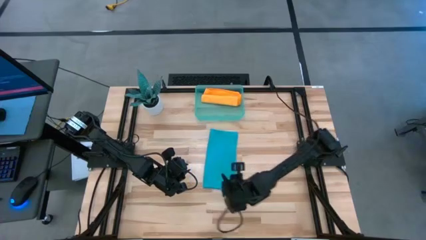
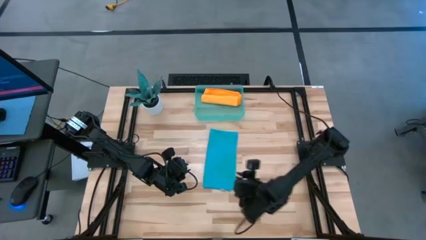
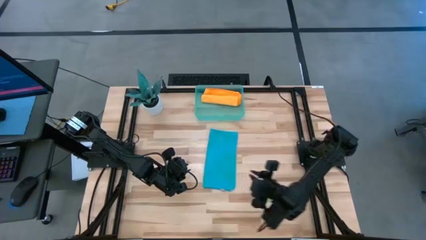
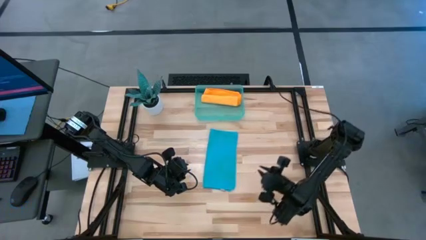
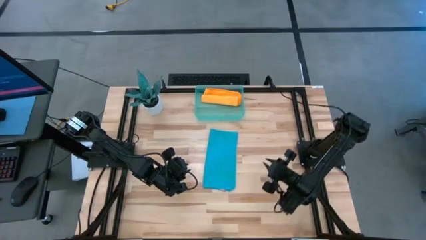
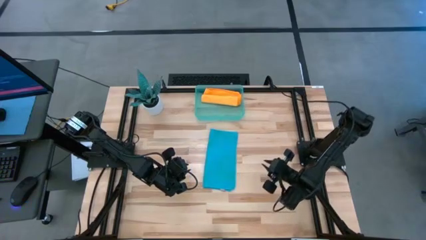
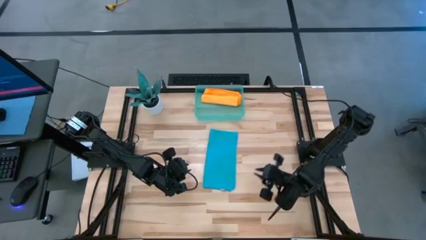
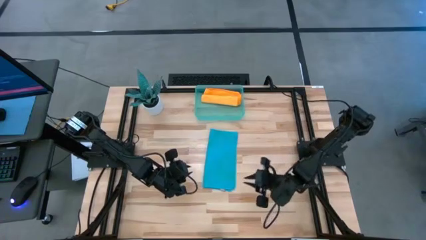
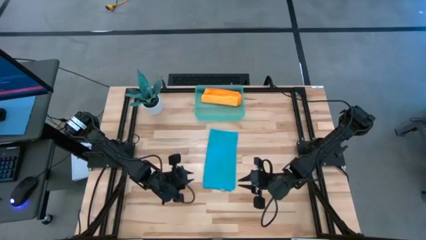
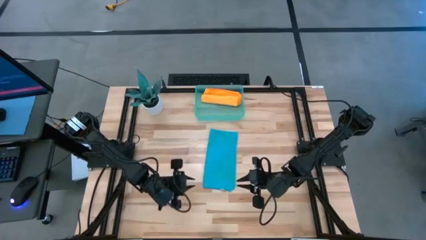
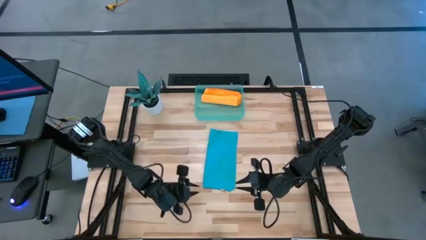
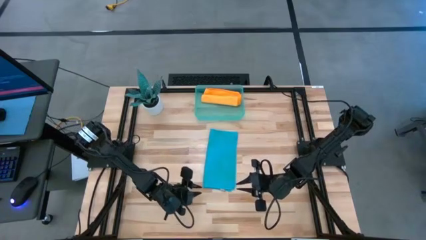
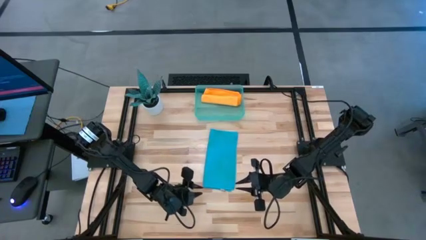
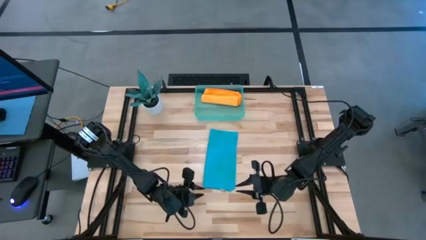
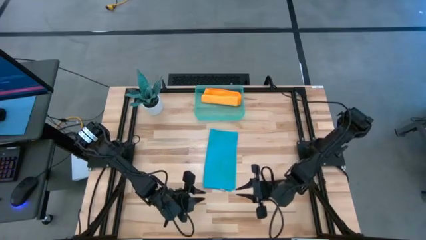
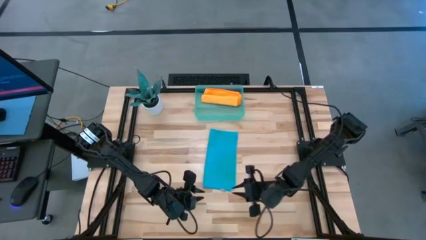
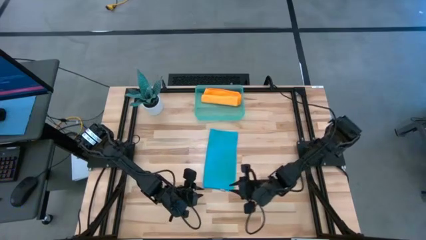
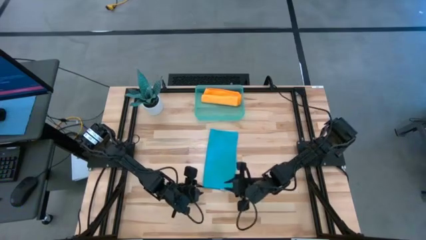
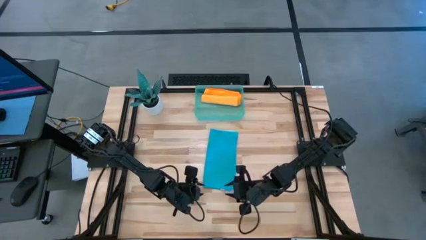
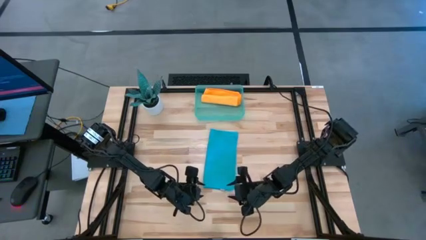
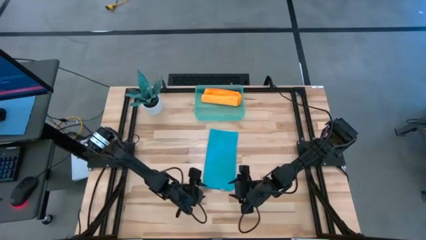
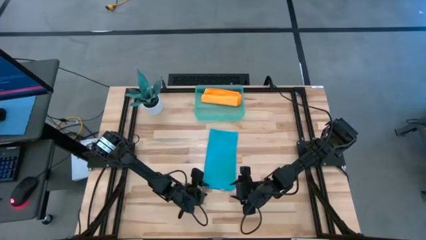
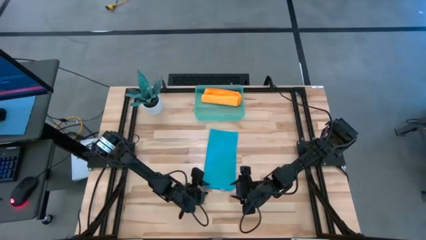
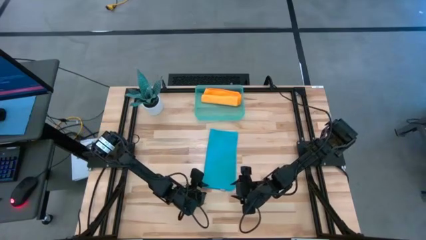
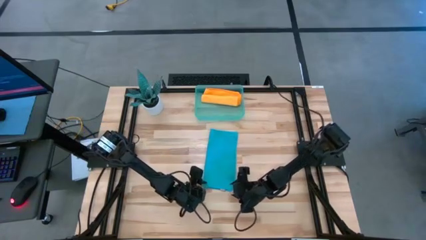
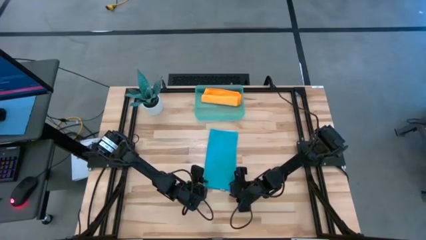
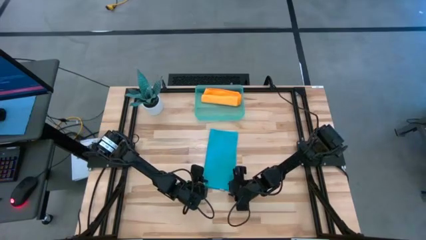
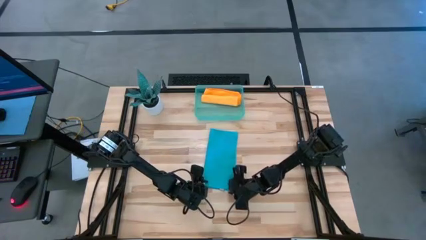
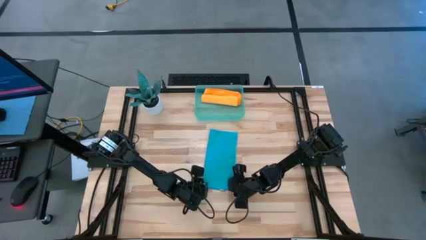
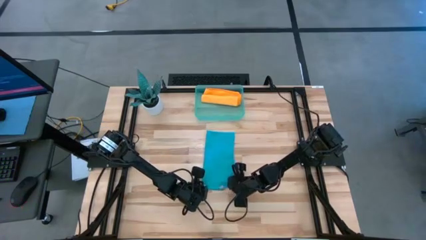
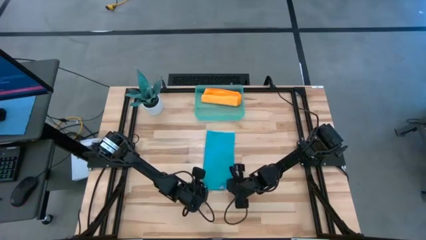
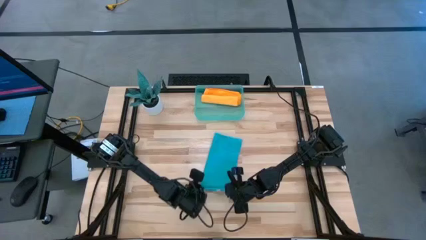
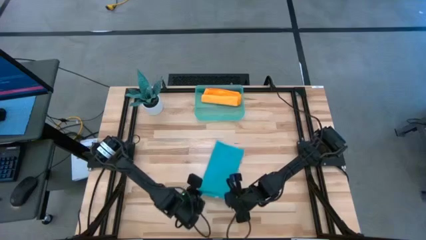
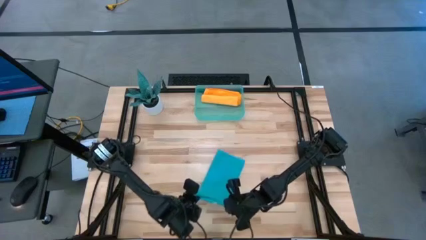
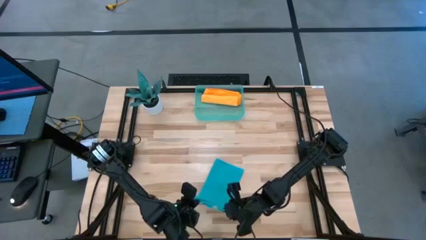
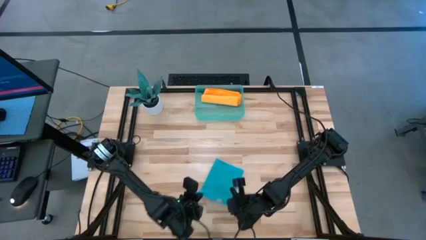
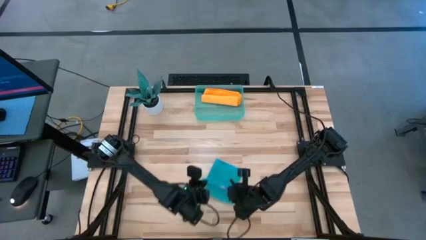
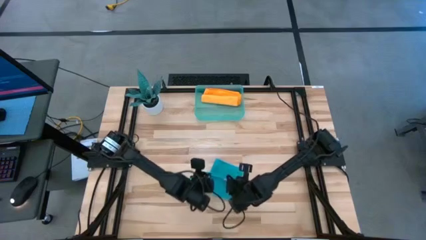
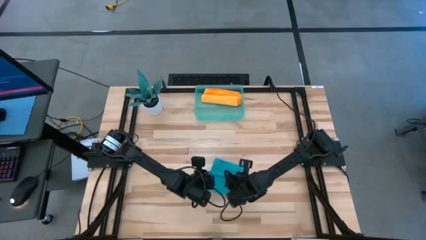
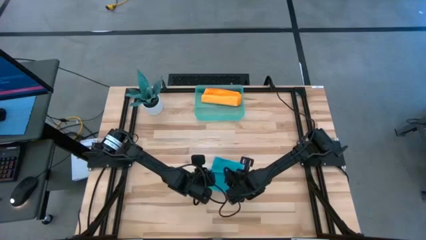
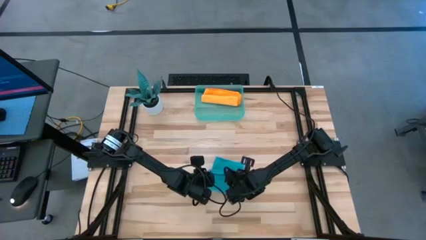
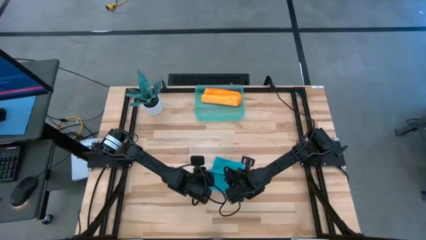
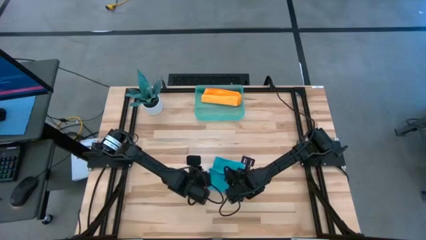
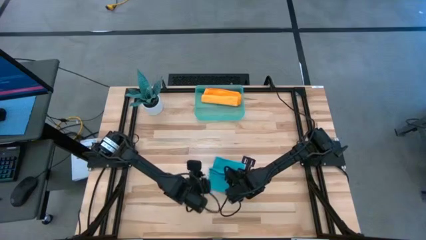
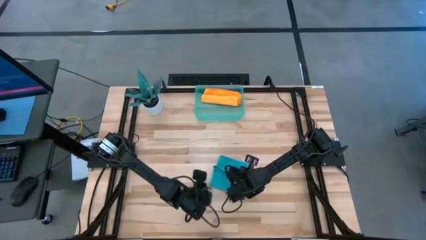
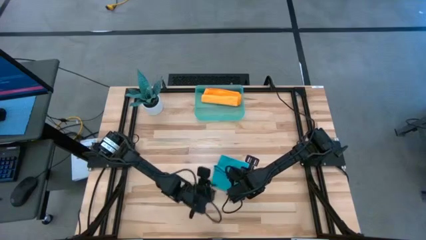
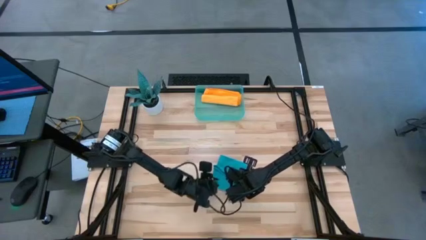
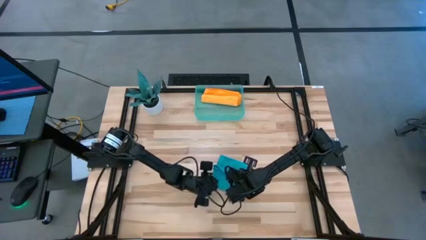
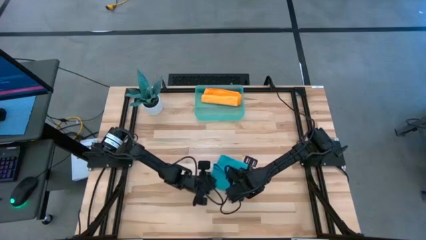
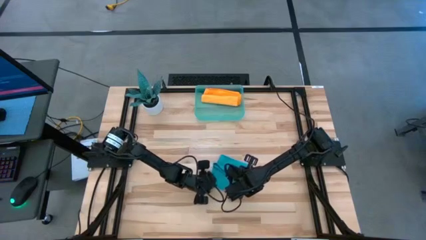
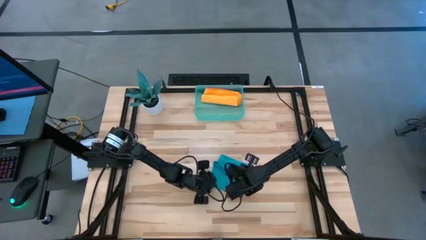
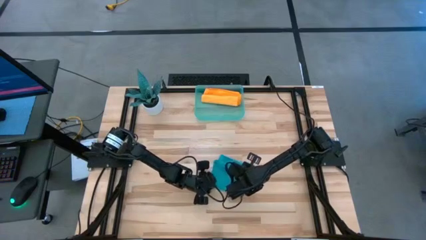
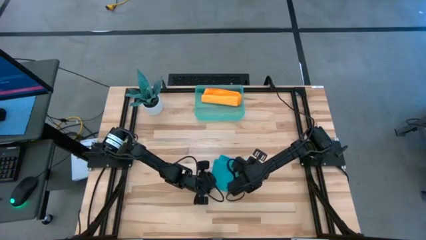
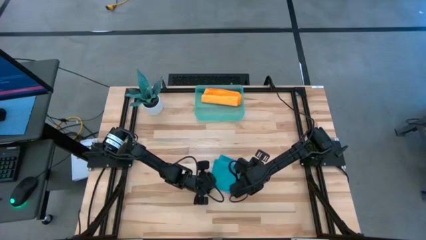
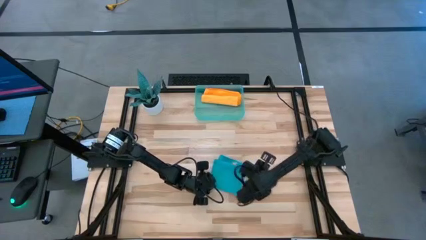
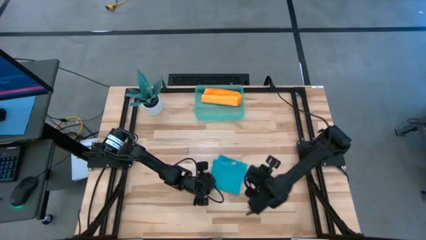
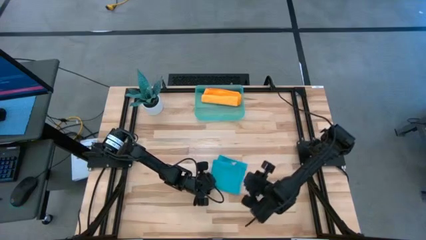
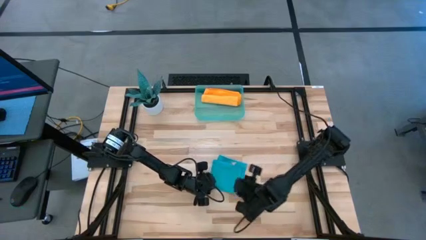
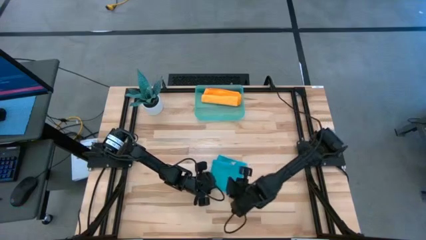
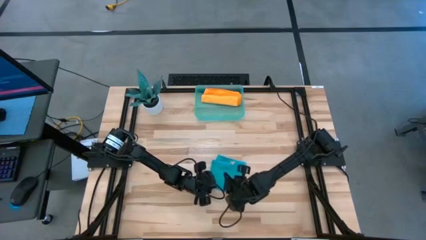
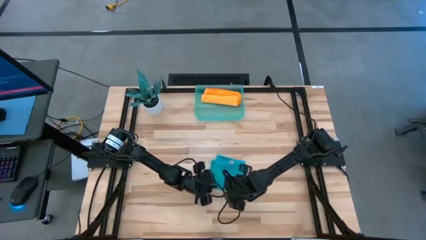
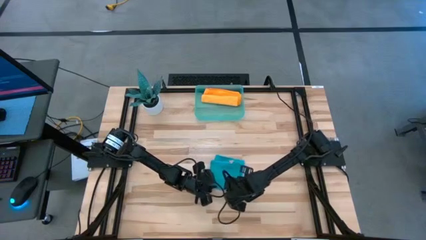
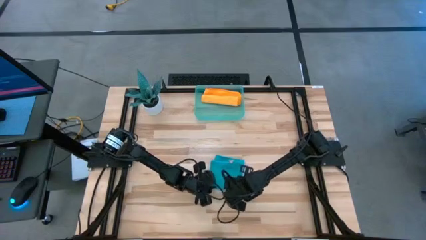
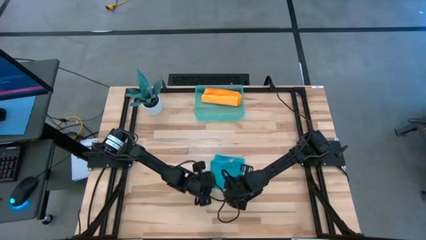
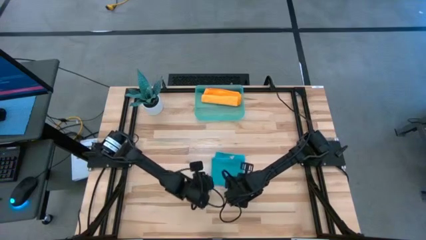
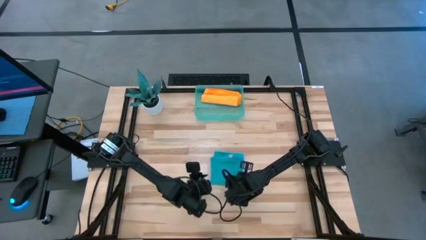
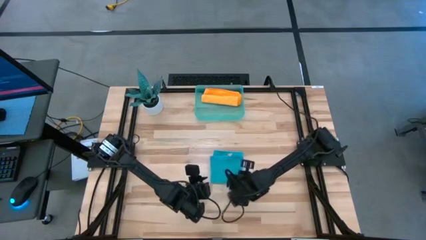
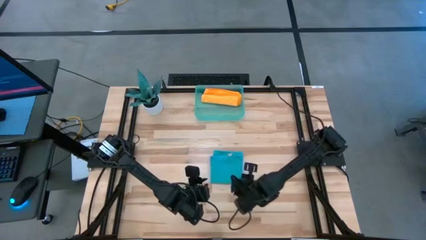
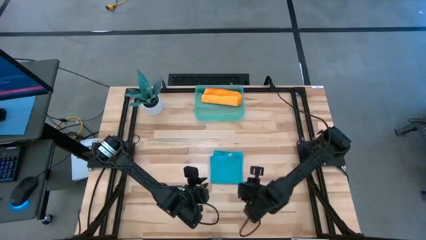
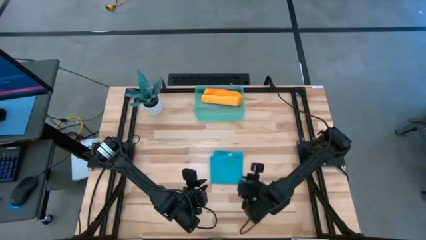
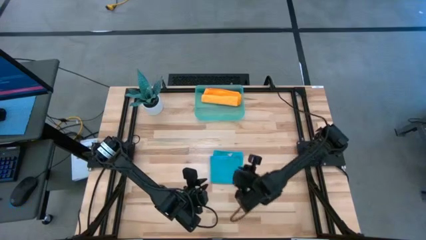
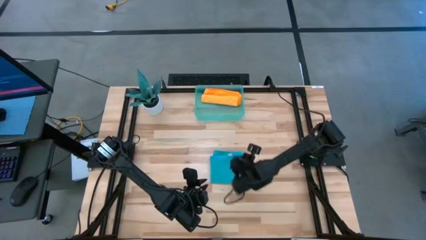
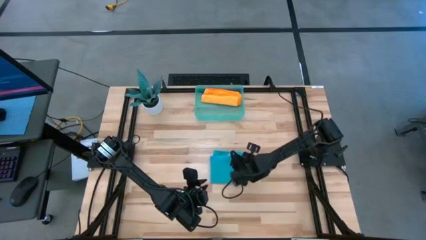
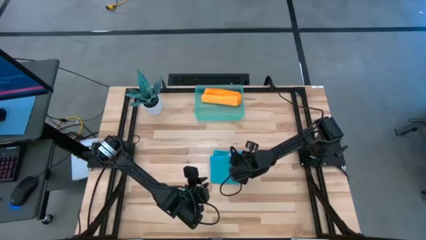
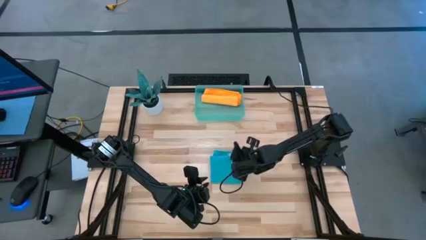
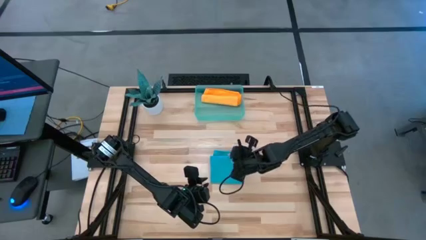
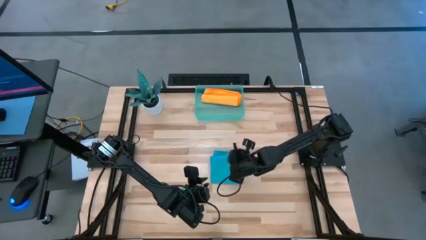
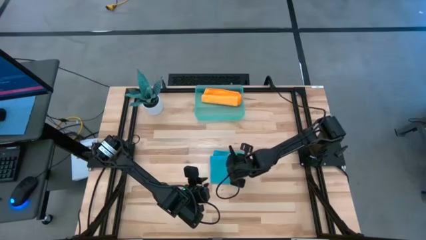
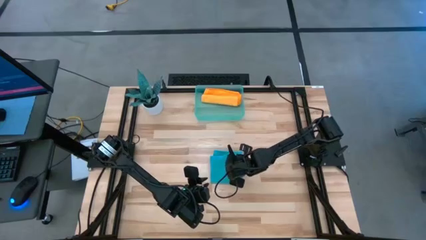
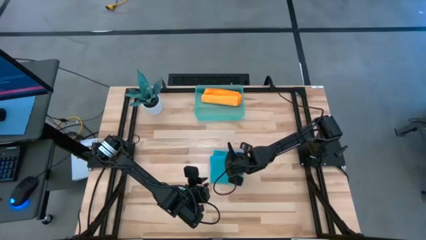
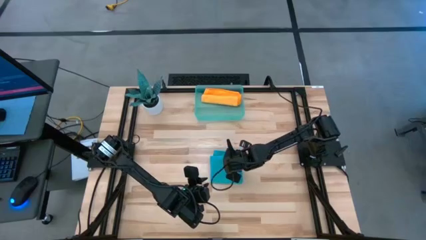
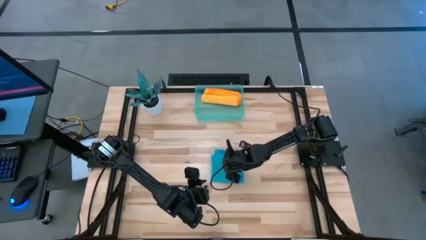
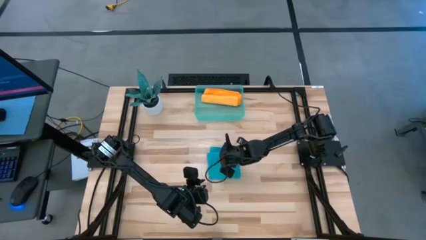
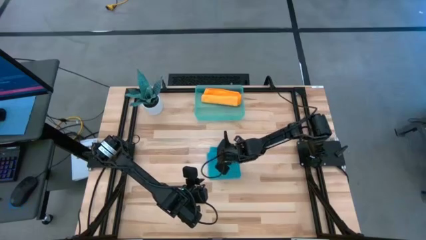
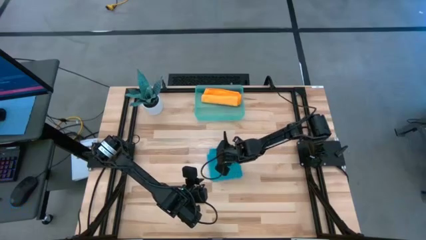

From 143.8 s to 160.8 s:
Task: Roll microfiber towels into tight, uniform cylinder then place into a basket
Roll the blue microfiber cloth
